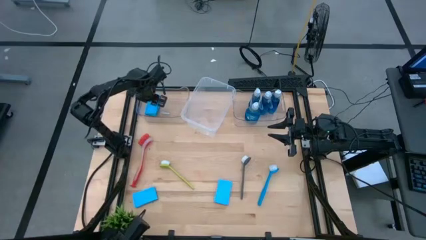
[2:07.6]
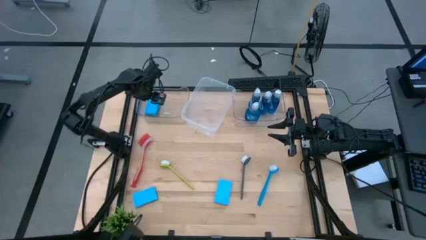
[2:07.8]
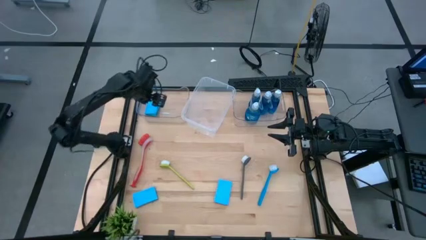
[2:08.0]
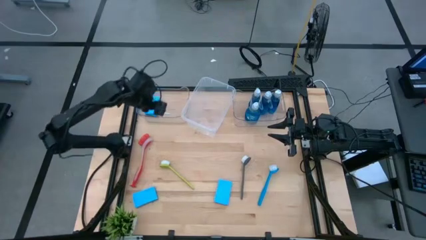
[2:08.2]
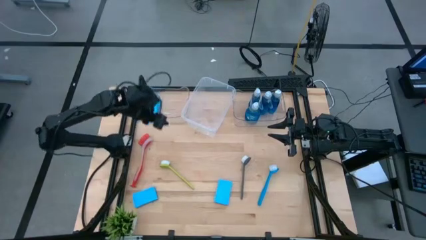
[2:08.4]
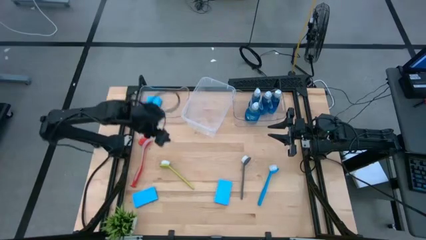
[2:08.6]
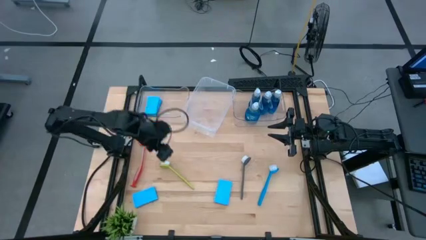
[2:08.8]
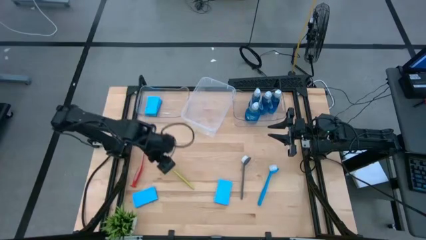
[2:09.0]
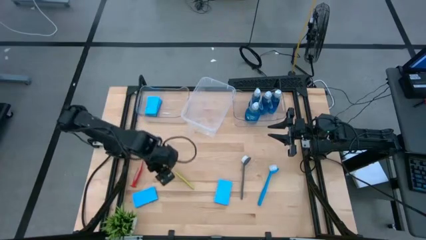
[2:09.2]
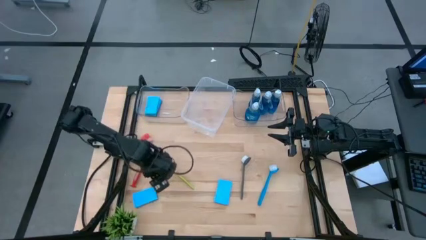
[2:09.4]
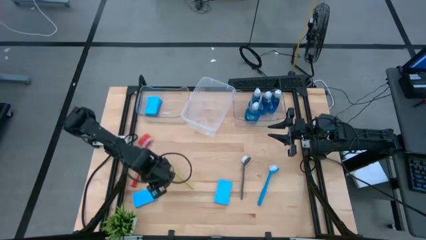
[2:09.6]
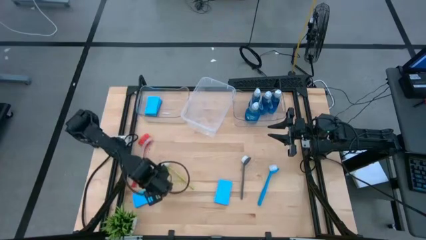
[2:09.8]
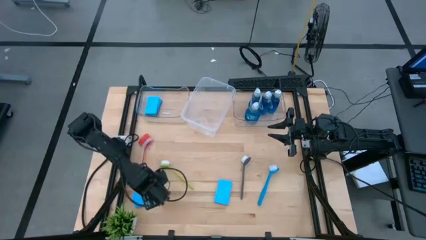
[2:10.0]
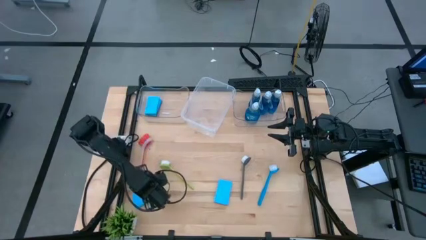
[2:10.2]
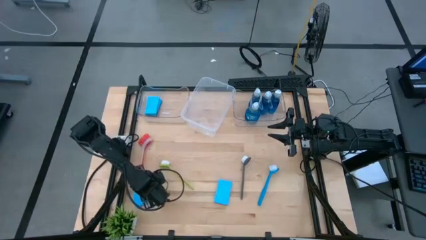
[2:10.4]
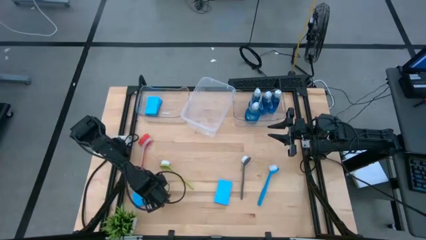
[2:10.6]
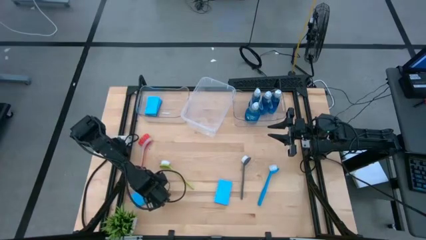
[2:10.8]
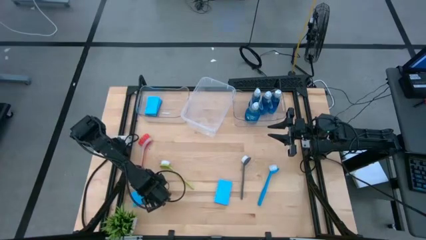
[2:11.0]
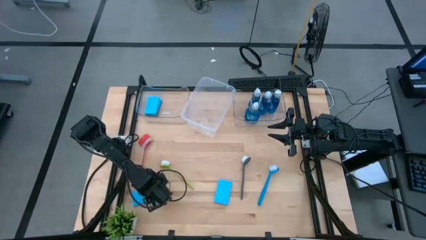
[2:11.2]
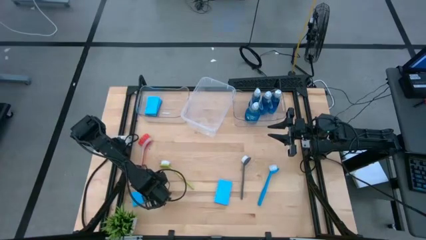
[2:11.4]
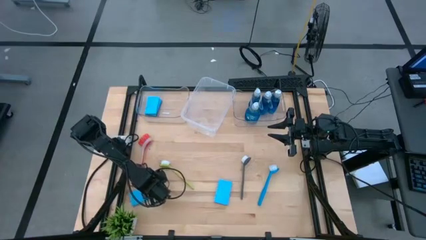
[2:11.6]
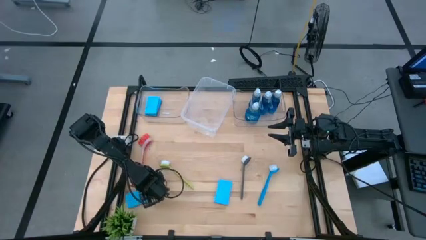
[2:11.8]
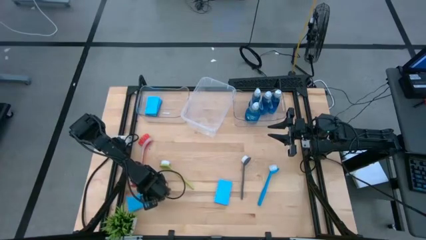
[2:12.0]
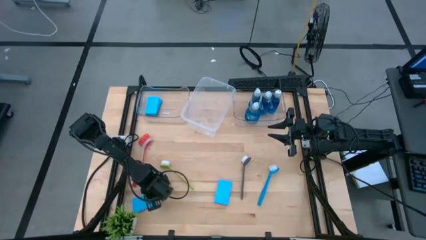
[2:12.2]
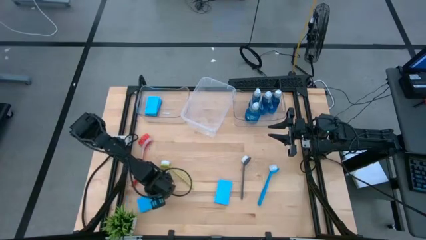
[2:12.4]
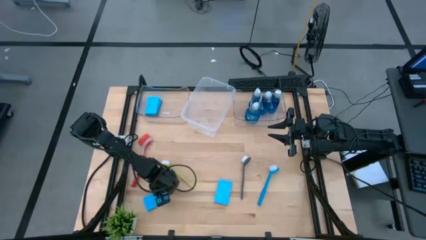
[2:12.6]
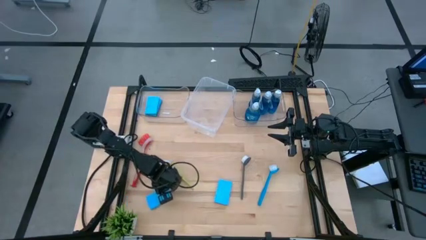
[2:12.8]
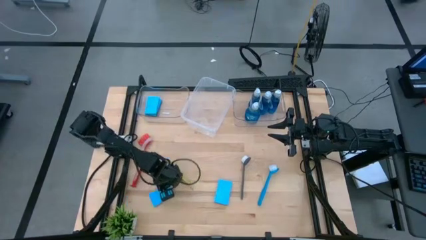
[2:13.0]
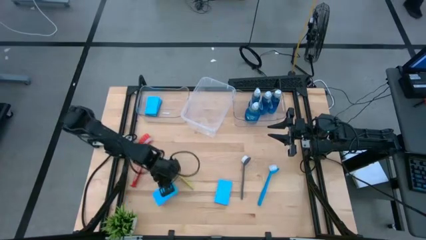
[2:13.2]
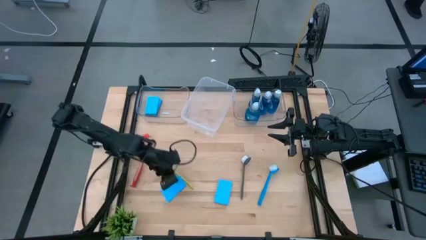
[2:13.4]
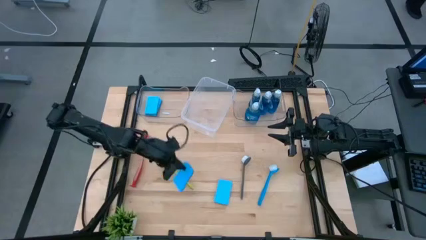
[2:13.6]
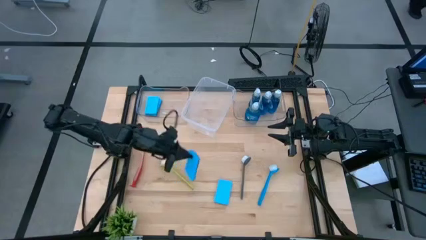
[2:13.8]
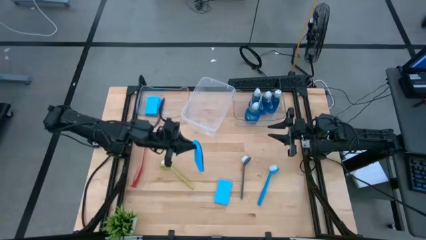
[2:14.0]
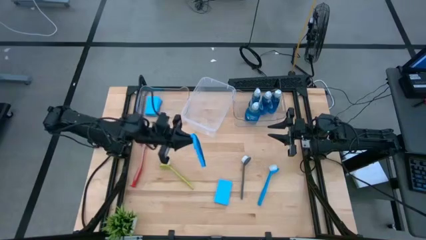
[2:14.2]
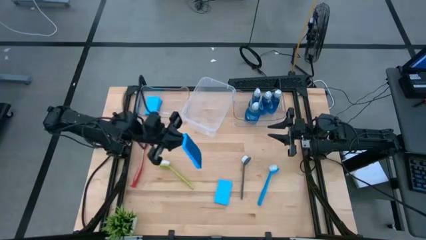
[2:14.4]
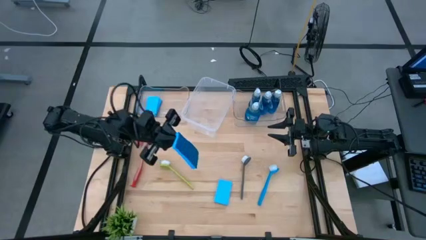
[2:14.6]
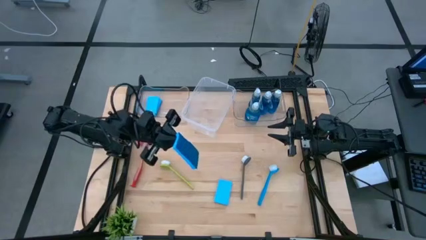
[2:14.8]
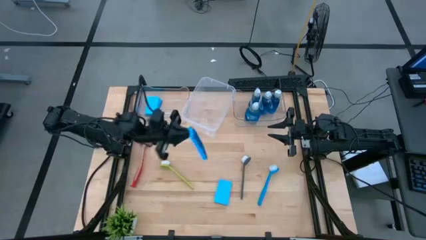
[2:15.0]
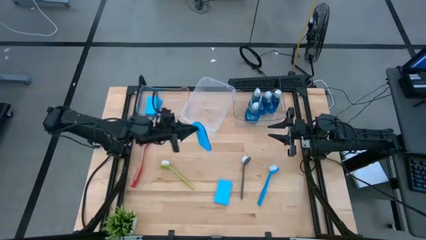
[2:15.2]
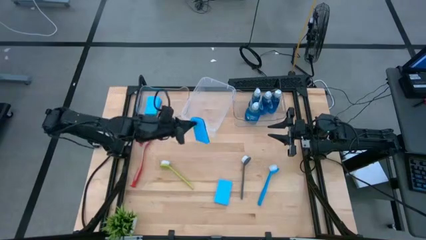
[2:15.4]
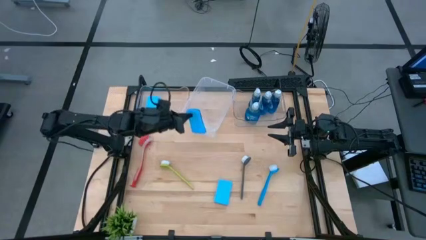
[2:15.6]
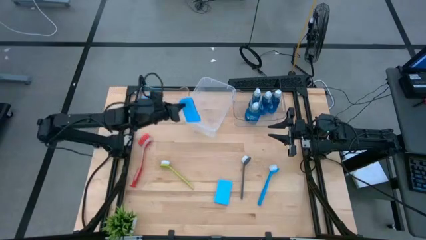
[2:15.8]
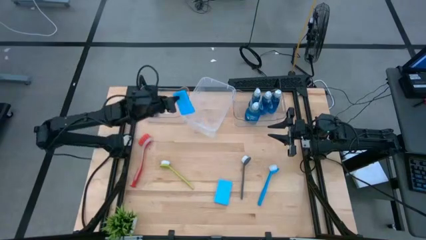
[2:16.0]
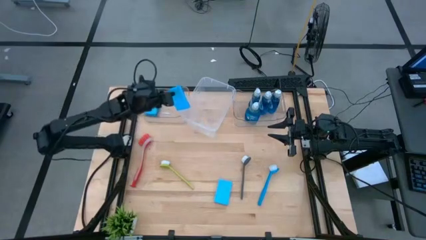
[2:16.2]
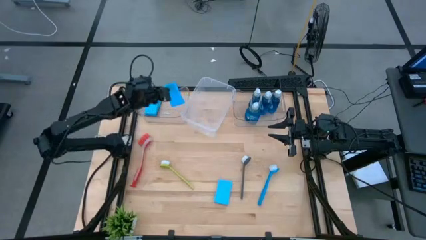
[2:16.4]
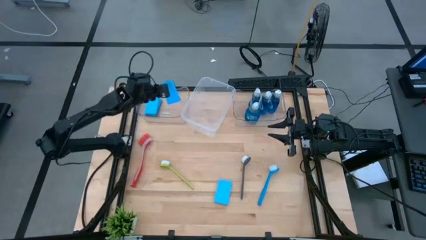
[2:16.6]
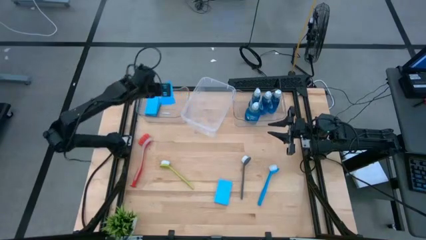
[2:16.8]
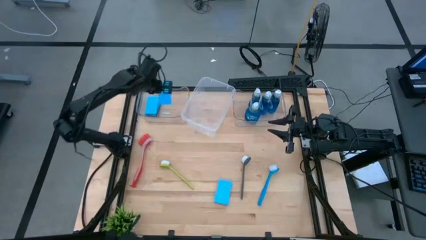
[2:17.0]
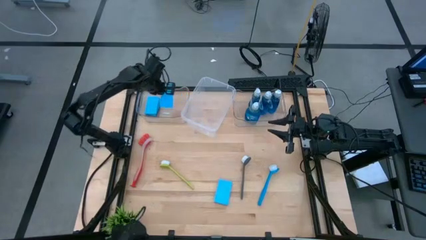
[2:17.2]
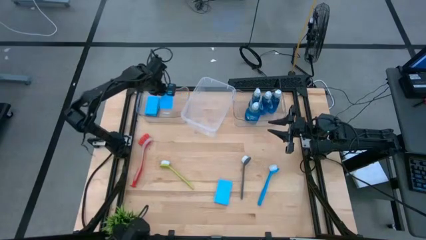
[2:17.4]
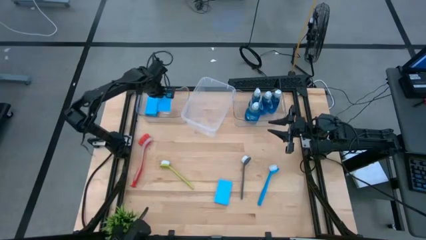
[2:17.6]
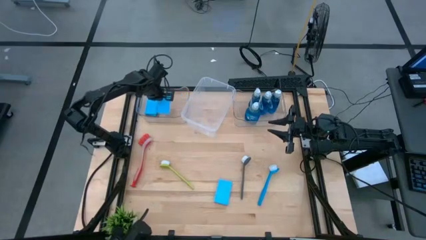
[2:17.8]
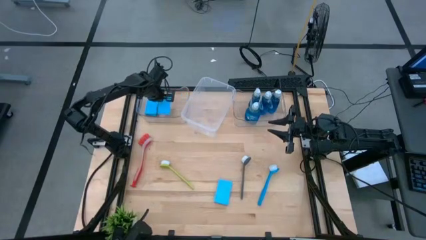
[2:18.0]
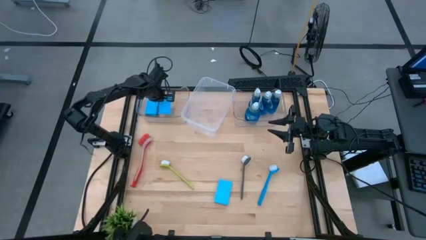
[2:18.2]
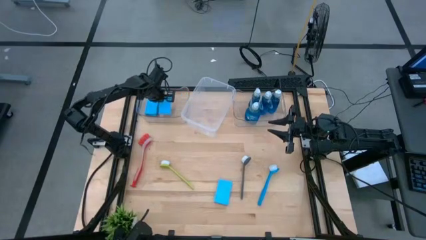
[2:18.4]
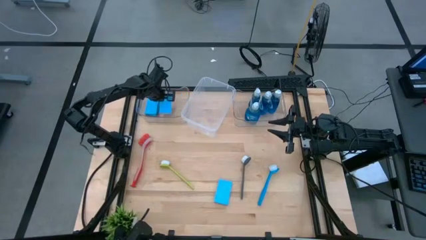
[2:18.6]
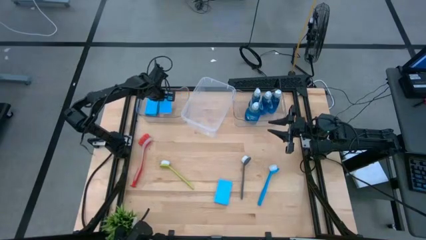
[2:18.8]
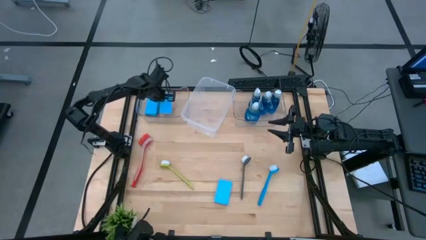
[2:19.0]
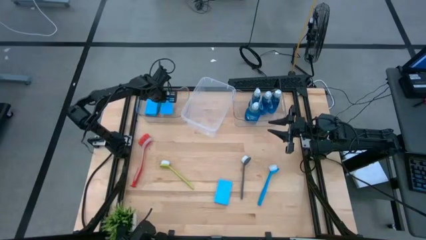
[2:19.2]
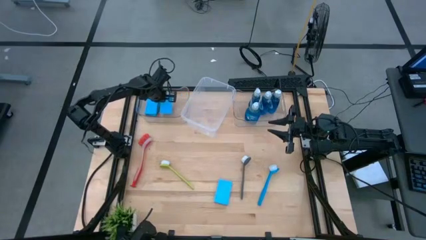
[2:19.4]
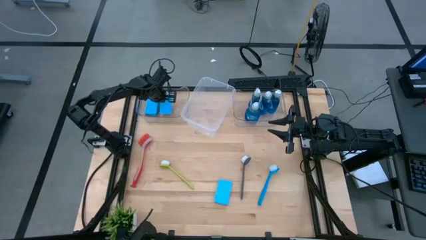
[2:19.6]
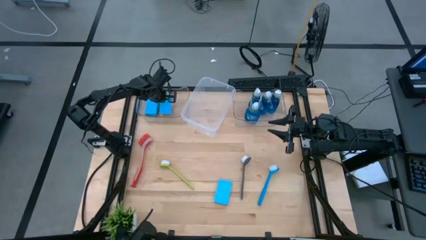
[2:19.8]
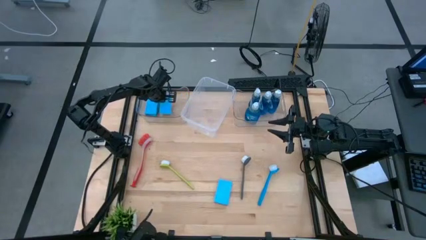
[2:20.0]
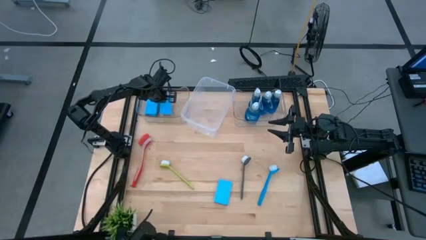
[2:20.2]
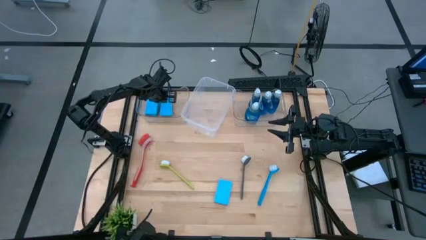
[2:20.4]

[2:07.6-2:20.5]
Task: Pick & Place Kitchen Sink Supplies
Put the blue sponge into the left transparent bin

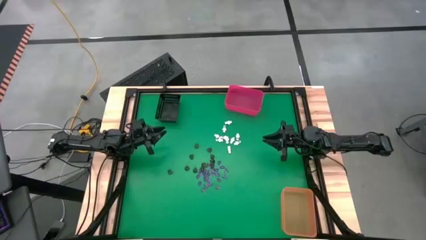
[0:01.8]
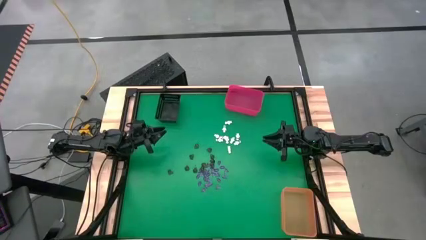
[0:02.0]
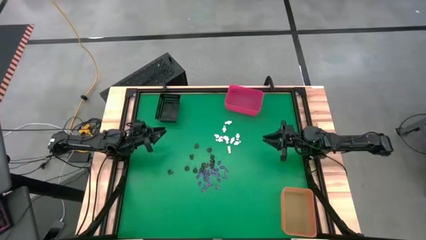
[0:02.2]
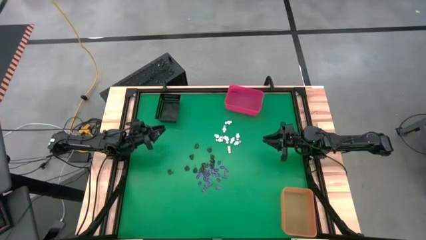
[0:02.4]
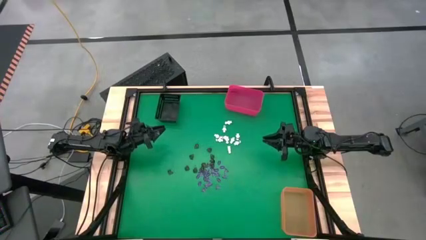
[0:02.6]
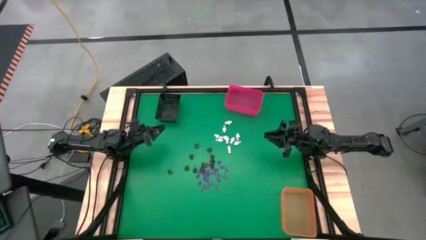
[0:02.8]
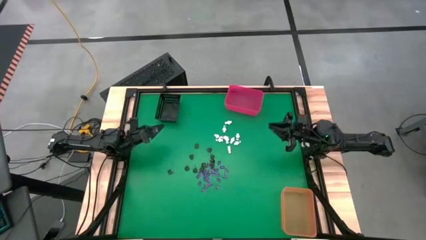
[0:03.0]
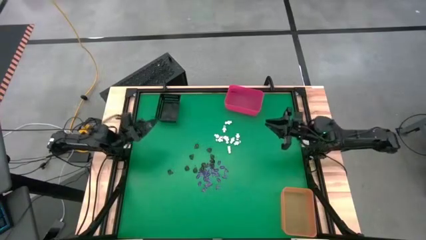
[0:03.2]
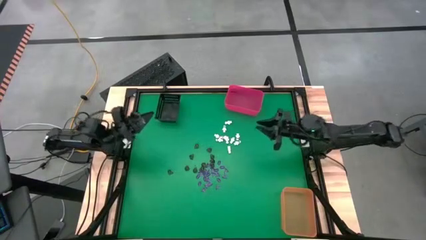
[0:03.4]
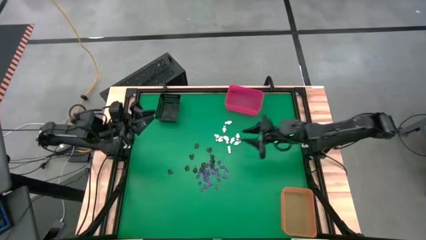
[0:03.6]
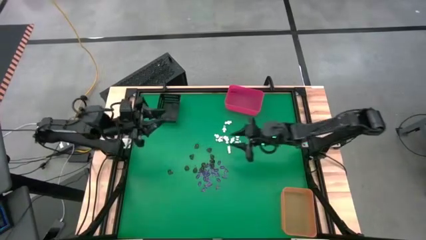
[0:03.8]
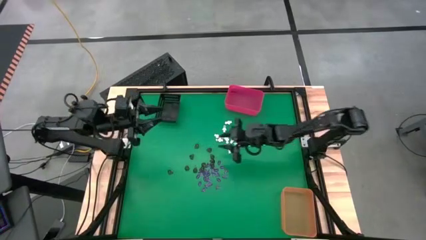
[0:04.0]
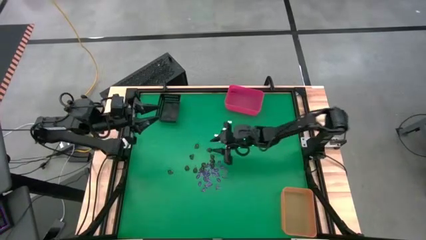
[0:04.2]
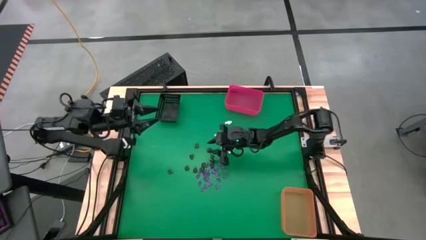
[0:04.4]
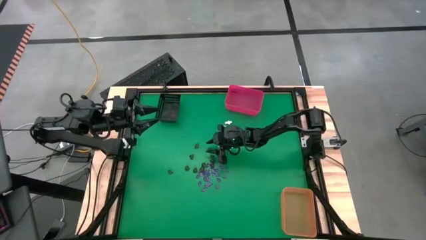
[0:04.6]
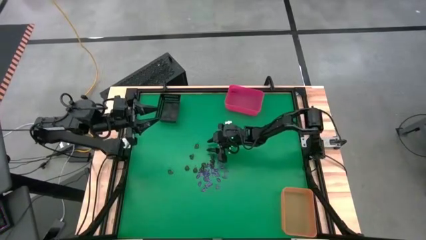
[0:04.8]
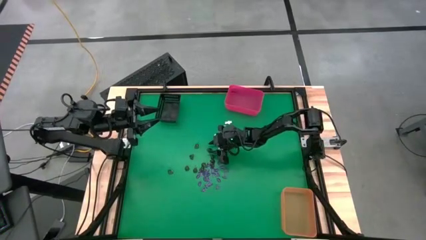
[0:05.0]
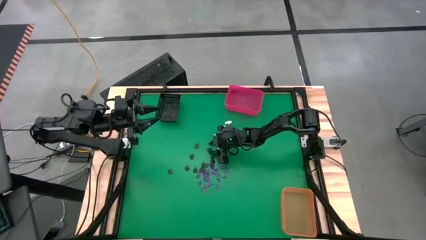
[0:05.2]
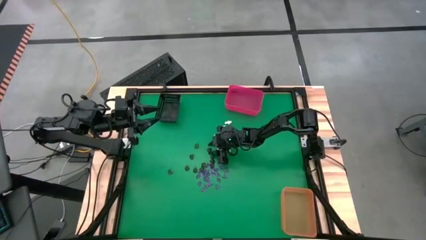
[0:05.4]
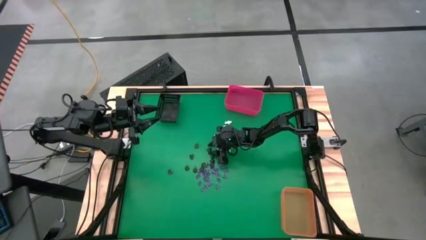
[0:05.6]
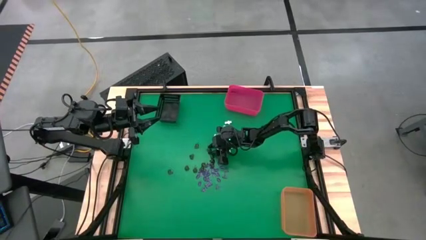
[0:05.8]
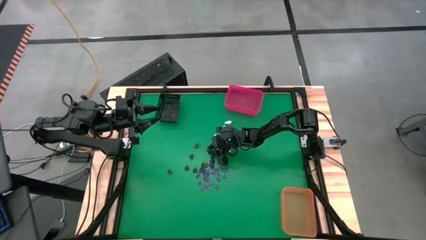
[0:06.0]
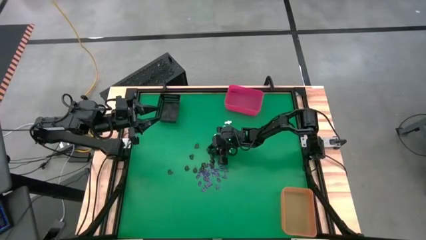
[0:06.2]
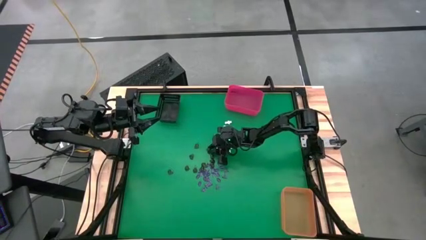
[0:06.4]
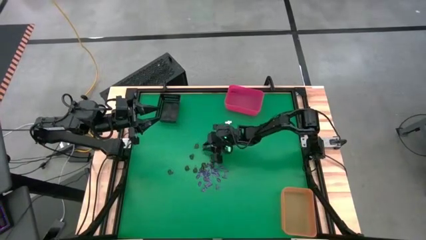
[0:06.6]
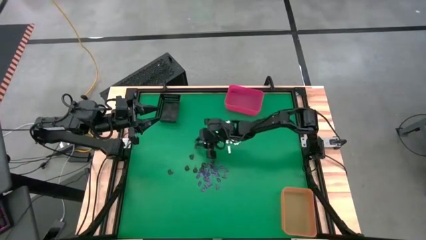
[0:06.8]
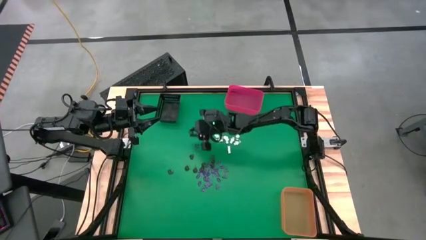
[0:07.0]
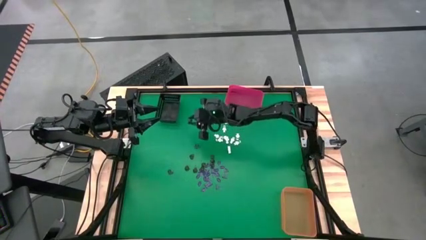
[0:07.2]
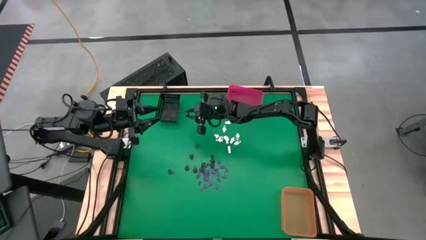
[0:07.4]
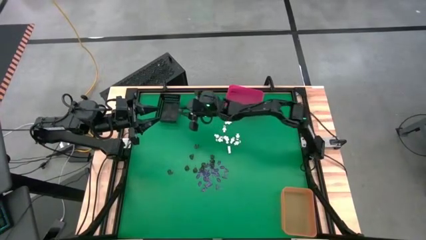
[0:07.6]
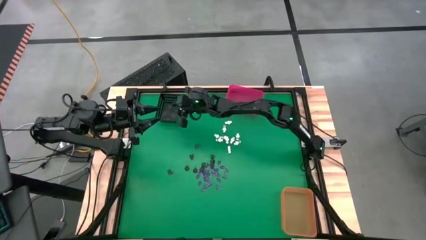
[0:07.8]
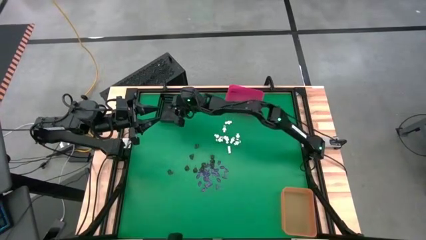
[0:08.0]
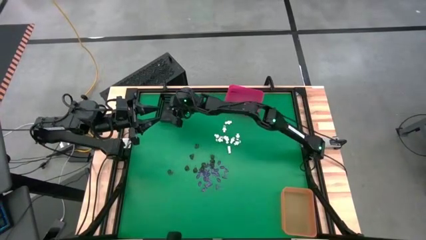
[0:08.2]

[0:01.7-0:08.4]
Task: Sort Halloween decoration
Put the brown skull toy into the black bin
